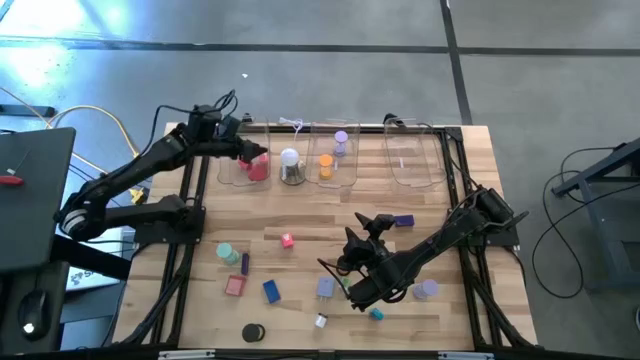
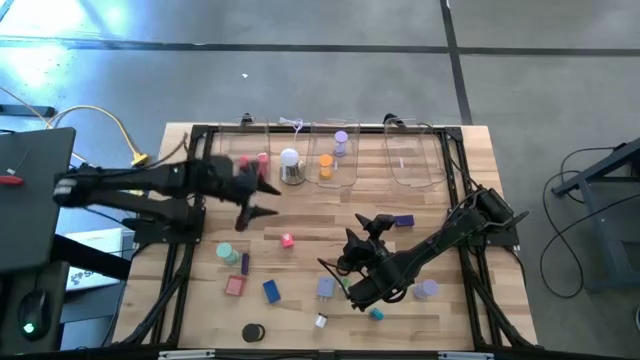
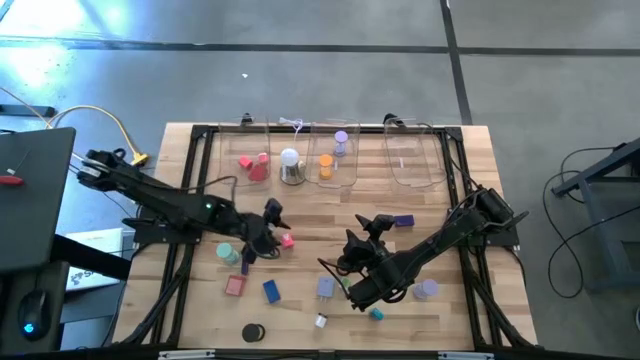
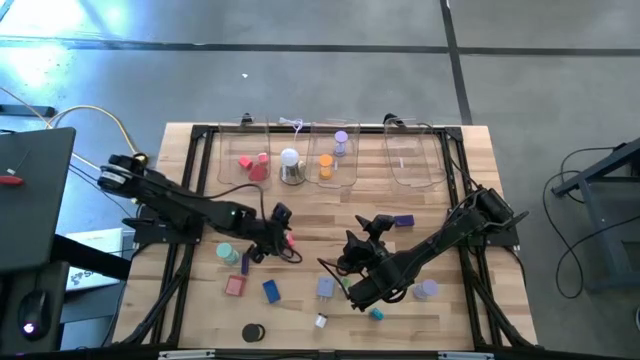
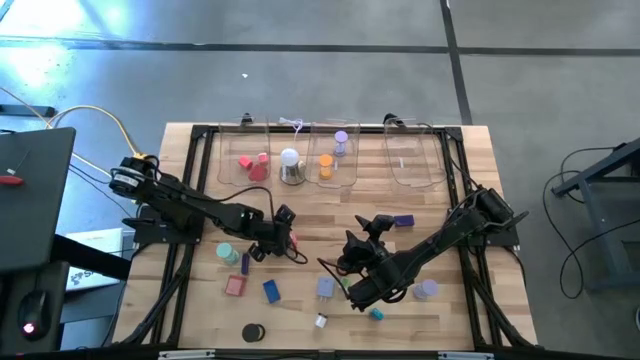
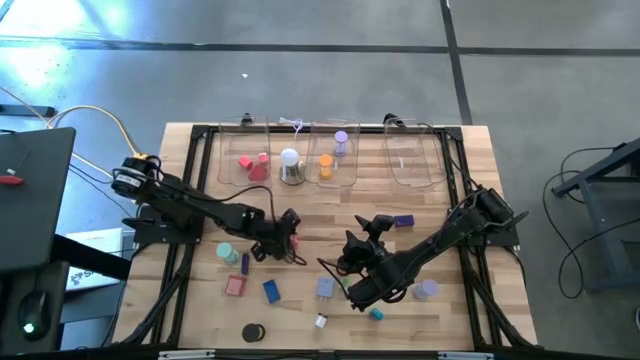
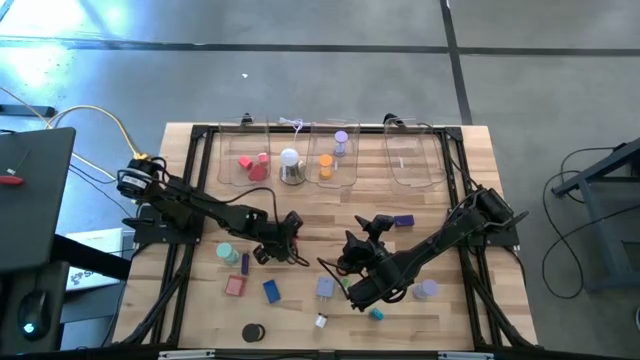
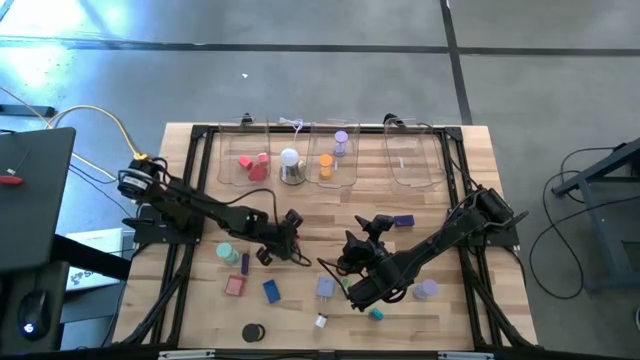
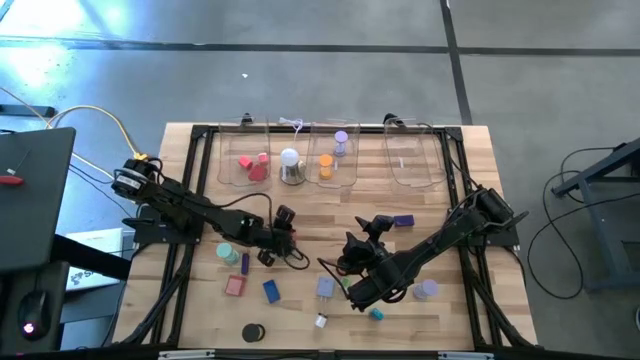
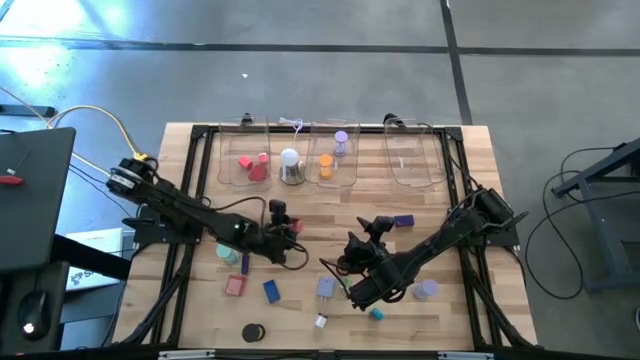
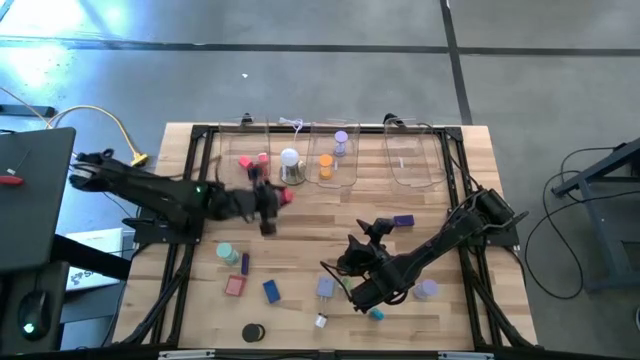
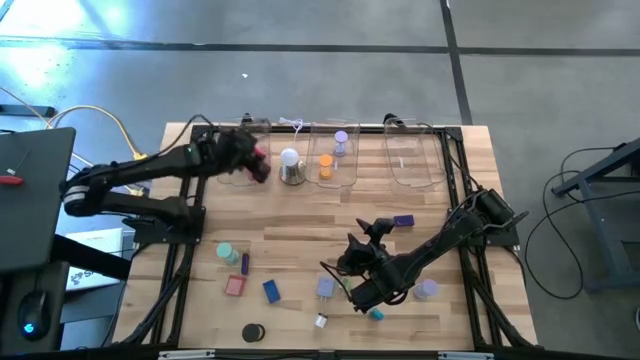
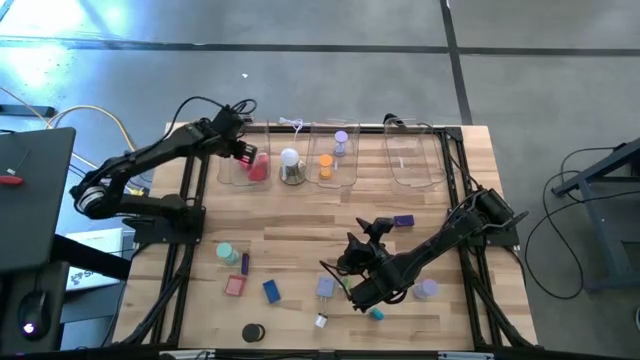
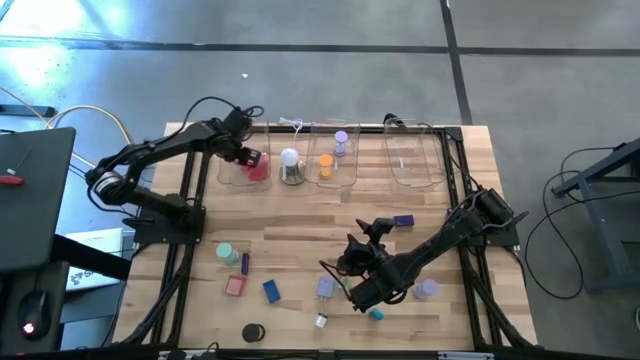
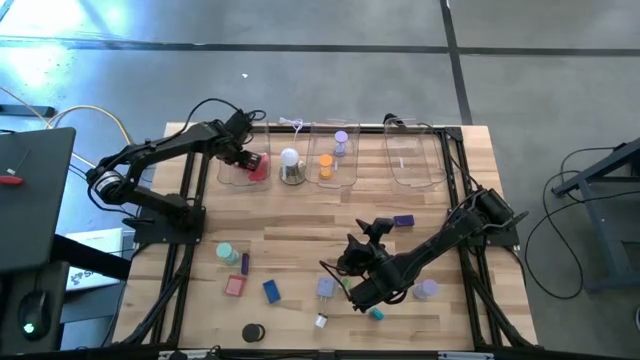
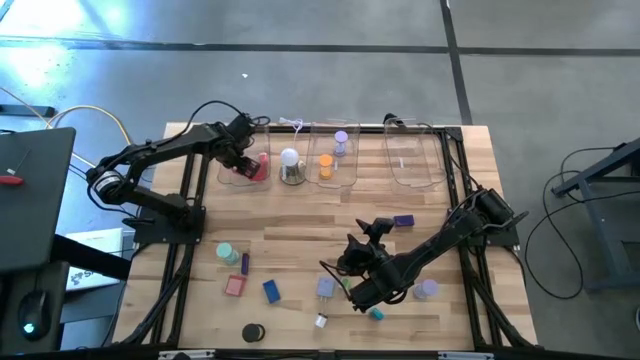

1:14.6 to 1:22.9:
Task: Pick & Place Office items
Put the pink charger adapter into the left transparent bin

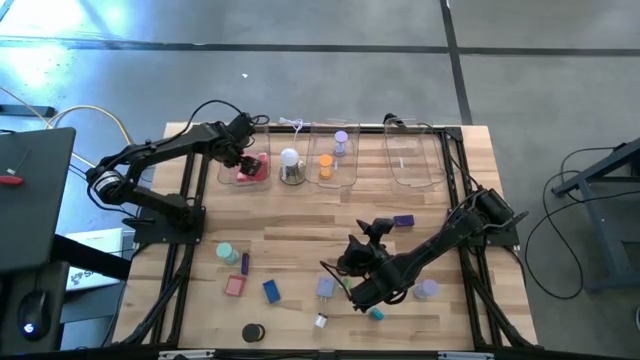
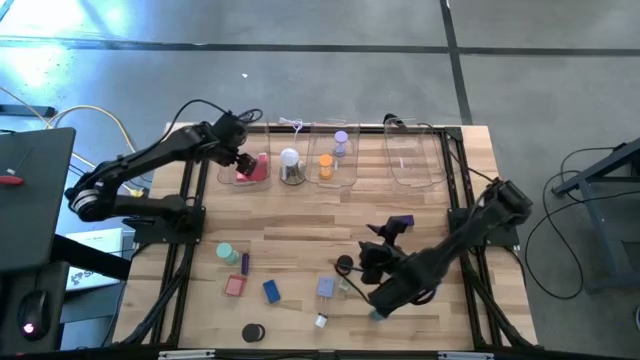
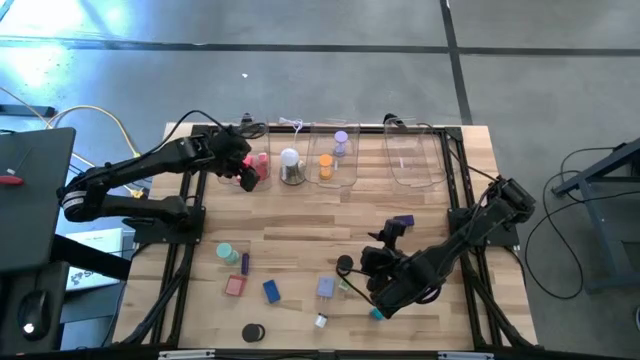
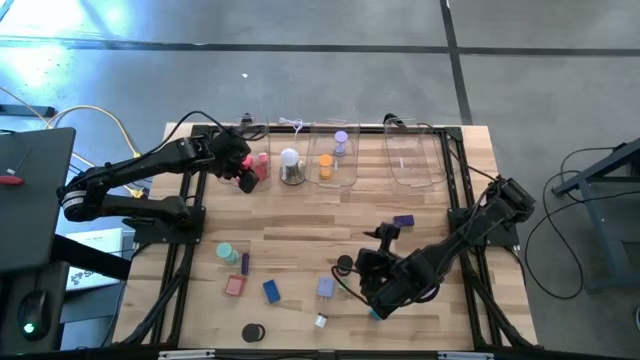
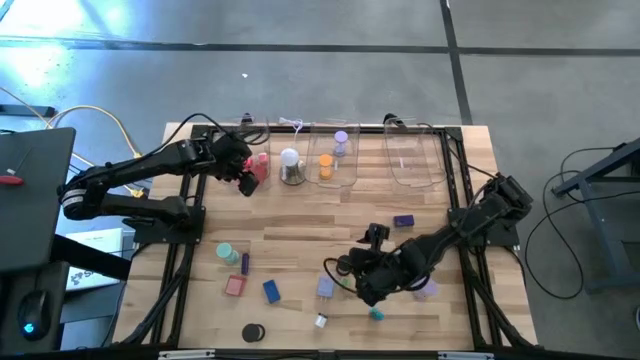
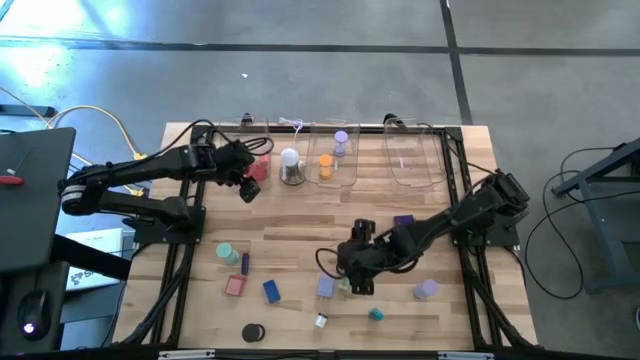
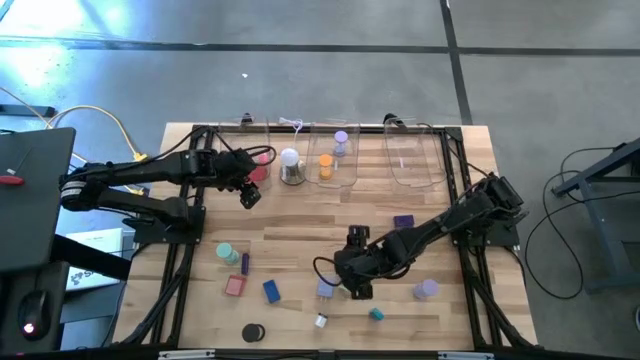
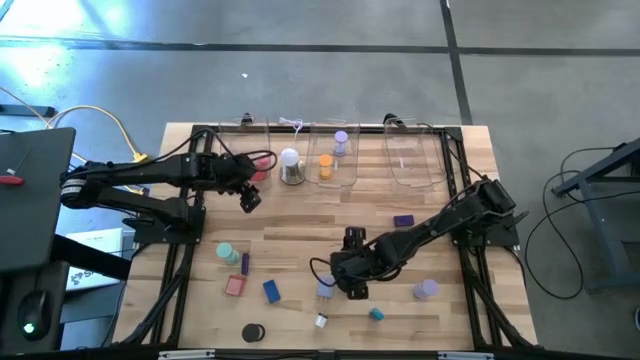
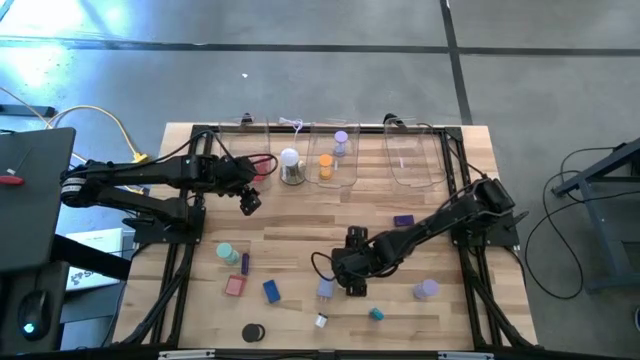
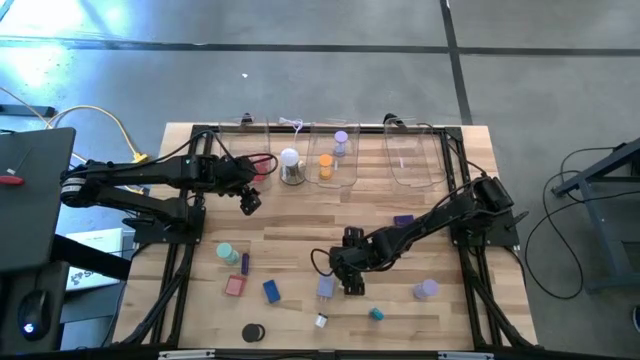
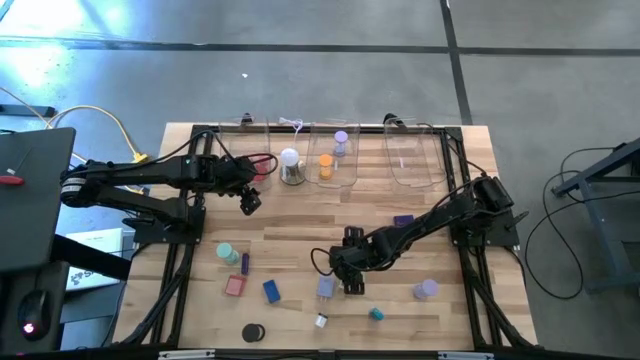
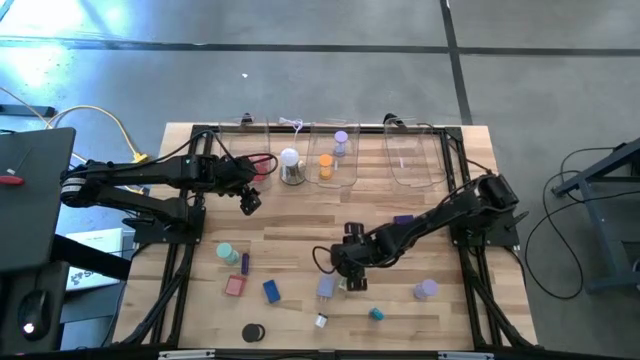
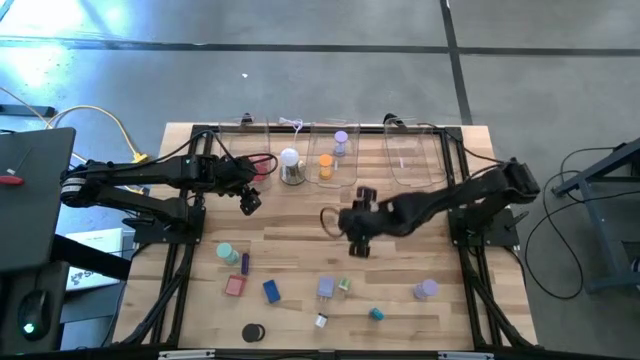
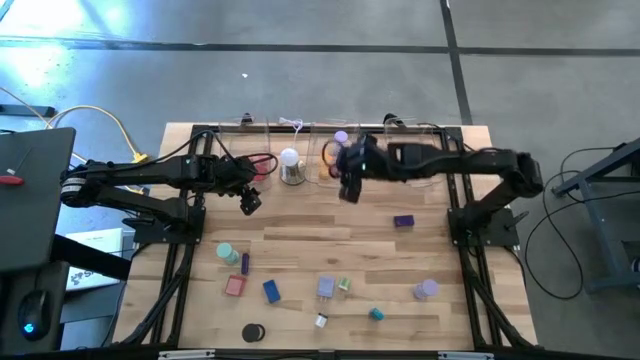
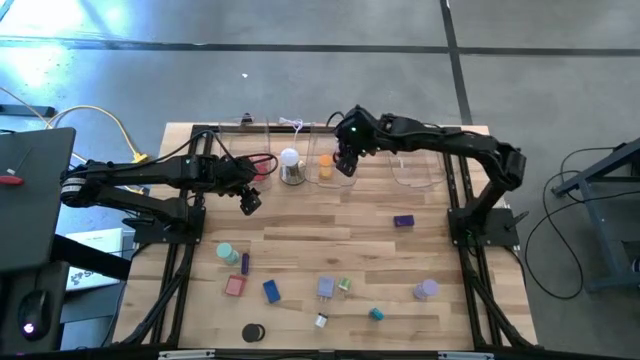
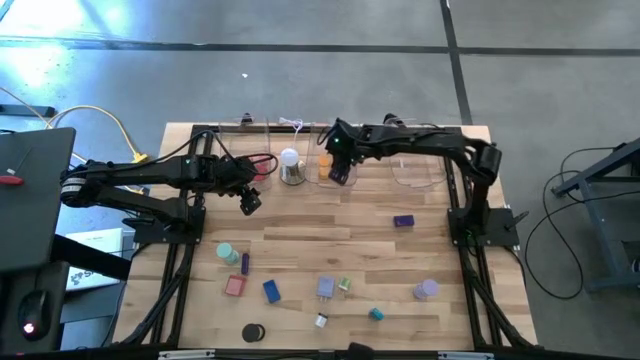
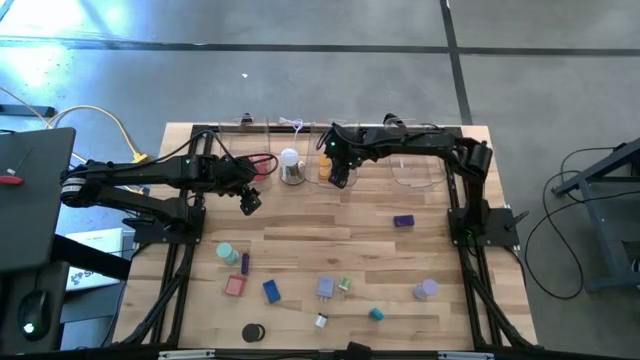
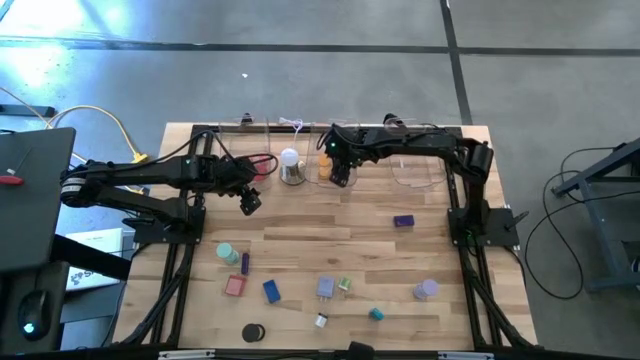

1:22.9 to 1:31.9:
Put the top black hourglass into the middle transparent bin

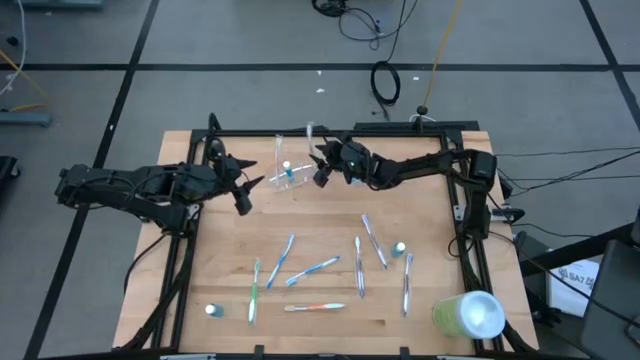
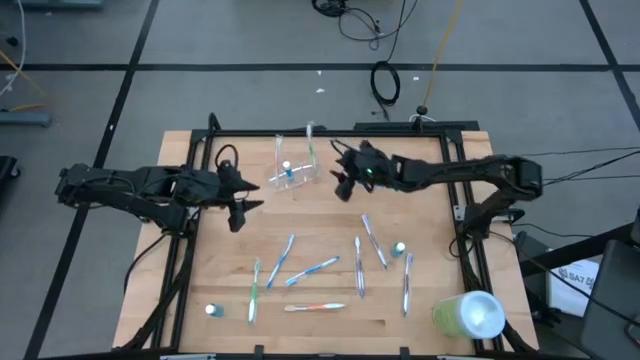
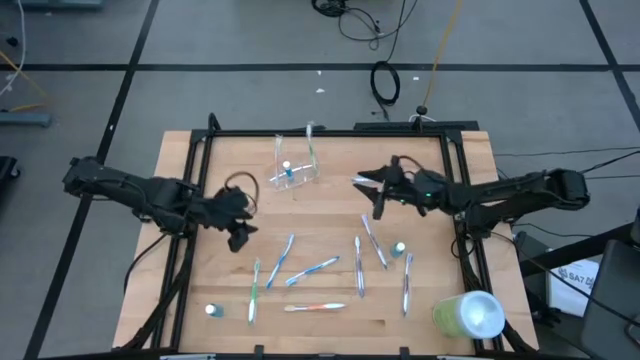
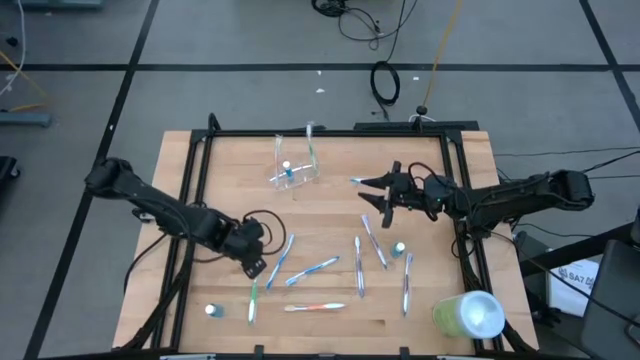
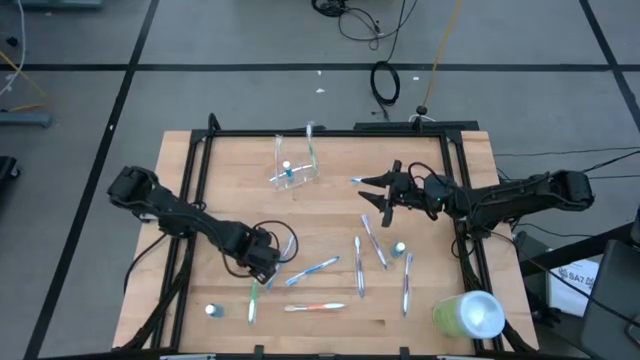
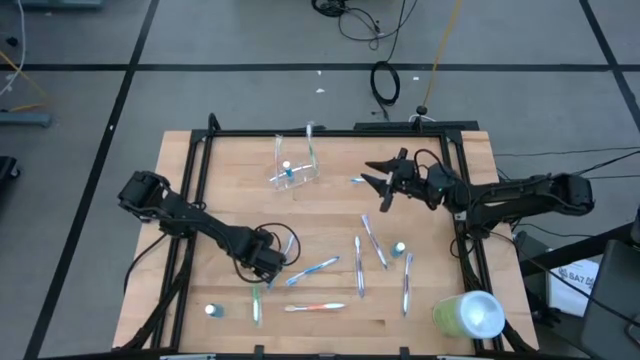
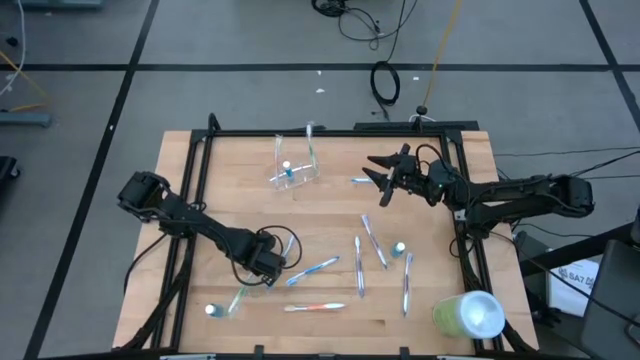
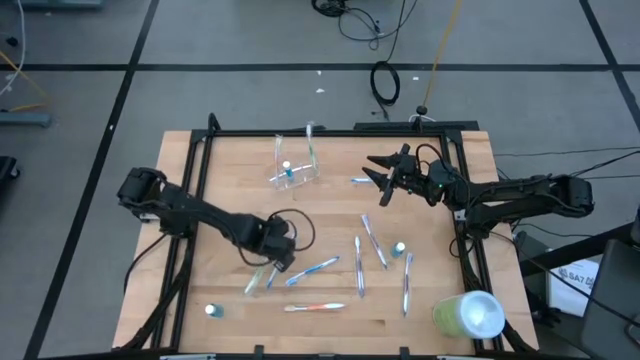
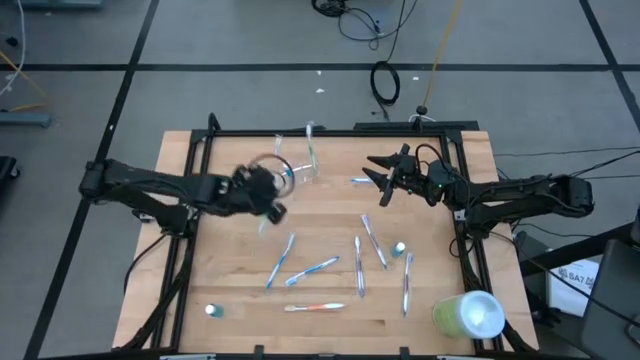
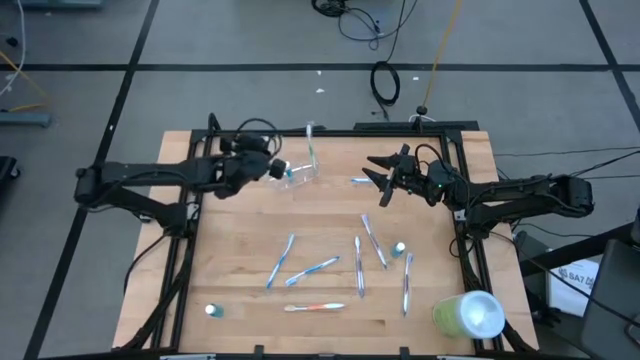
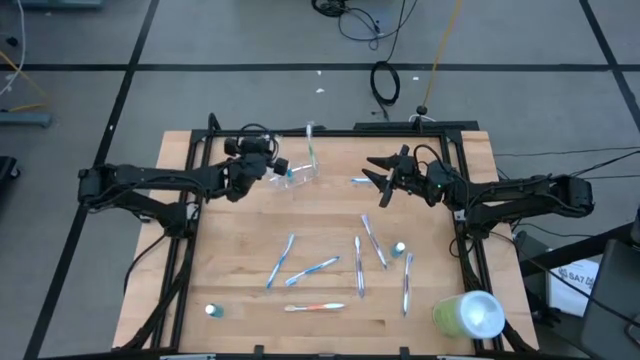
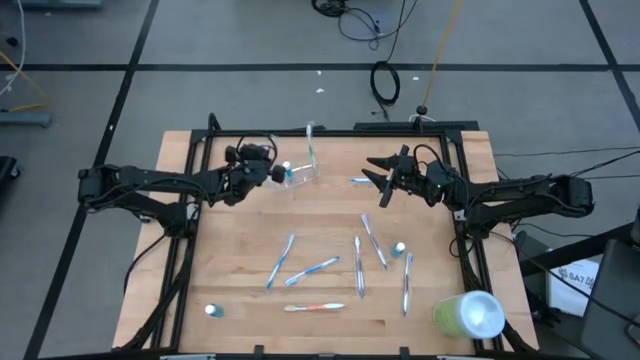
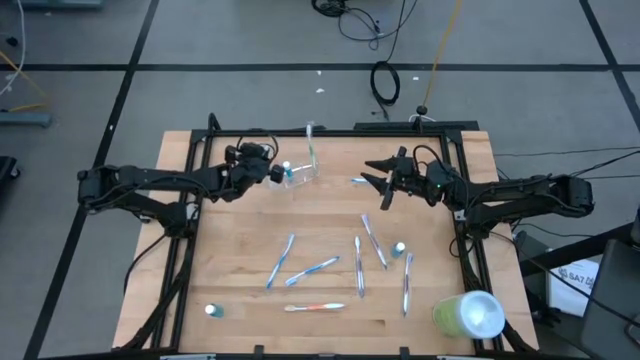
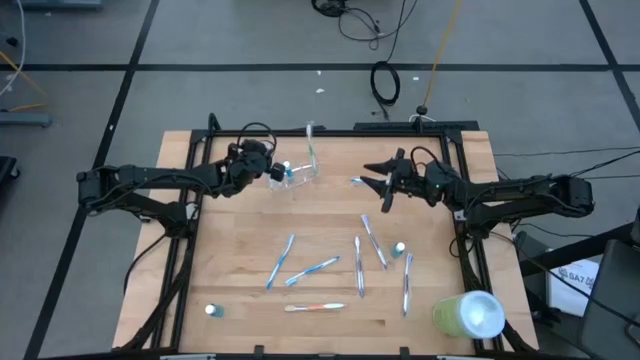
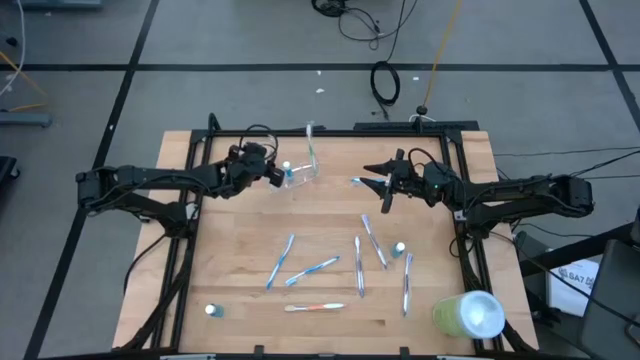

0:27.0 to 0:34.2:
Task: Pick & Place toothbrushing station
Put the green toothbrush into the transparent organizer
